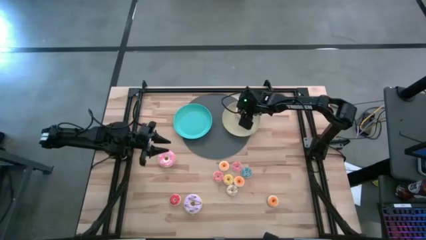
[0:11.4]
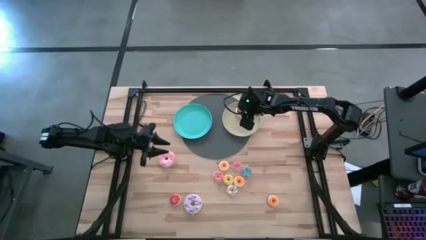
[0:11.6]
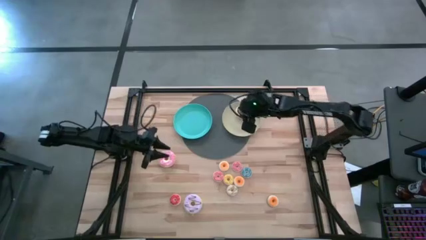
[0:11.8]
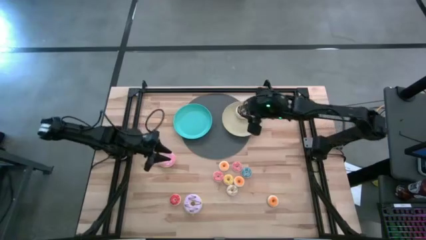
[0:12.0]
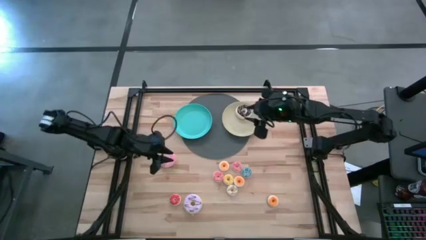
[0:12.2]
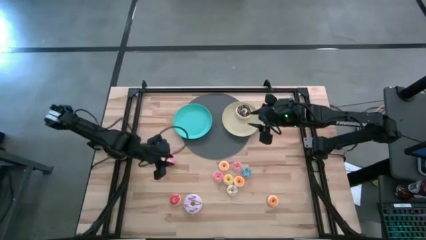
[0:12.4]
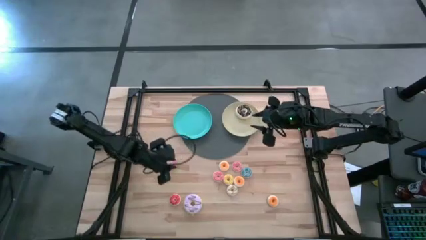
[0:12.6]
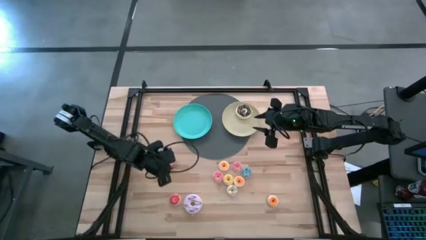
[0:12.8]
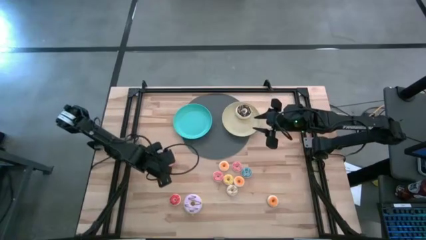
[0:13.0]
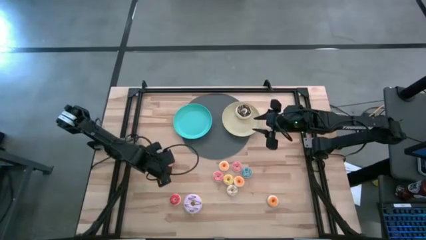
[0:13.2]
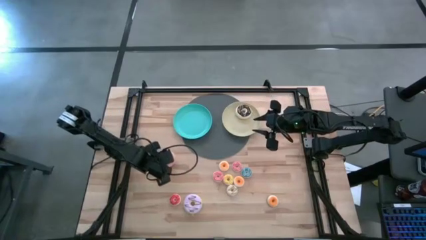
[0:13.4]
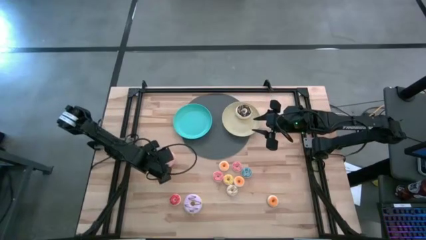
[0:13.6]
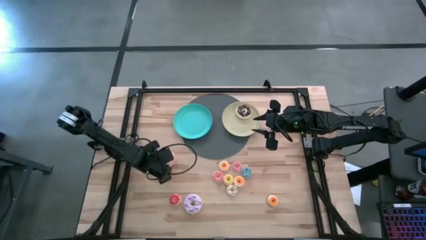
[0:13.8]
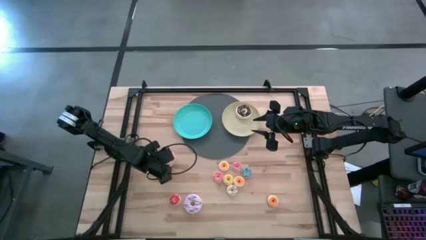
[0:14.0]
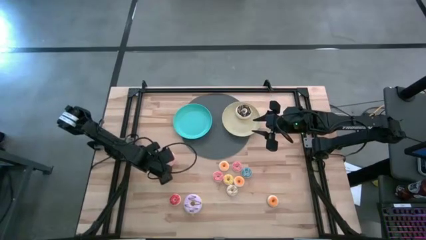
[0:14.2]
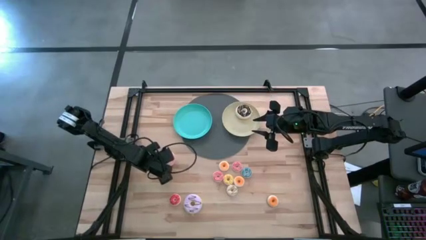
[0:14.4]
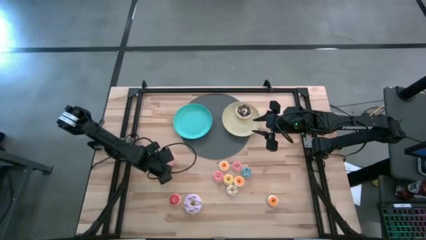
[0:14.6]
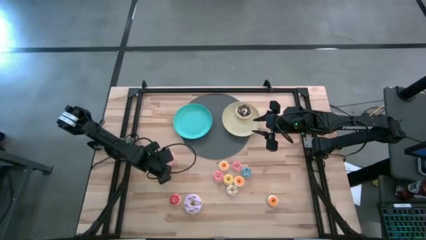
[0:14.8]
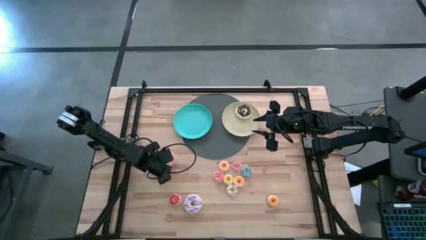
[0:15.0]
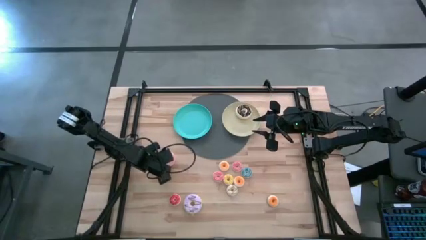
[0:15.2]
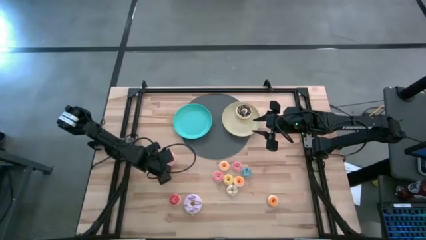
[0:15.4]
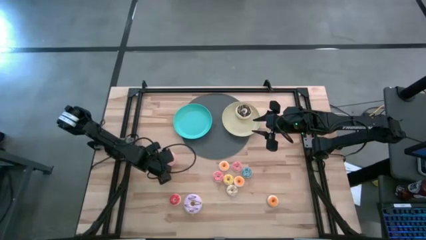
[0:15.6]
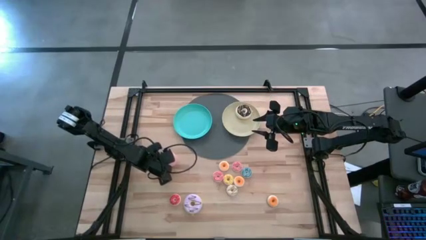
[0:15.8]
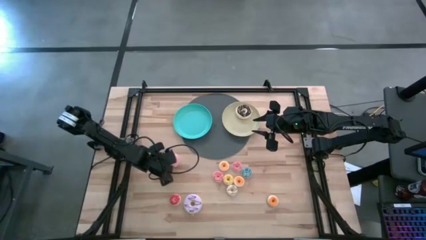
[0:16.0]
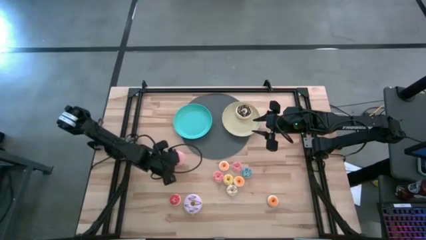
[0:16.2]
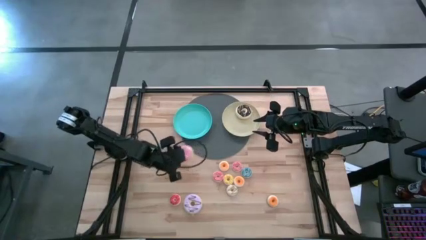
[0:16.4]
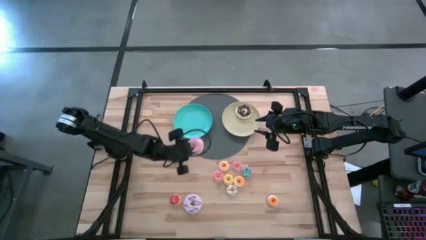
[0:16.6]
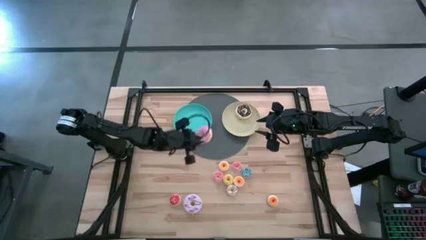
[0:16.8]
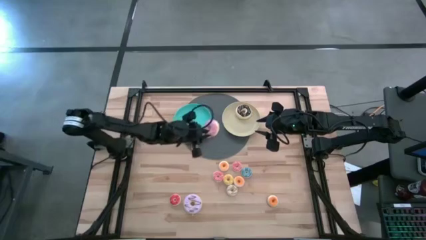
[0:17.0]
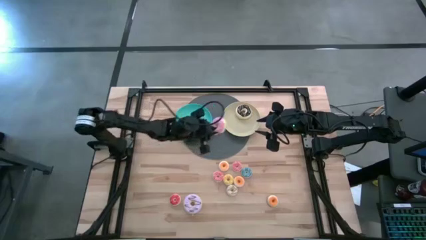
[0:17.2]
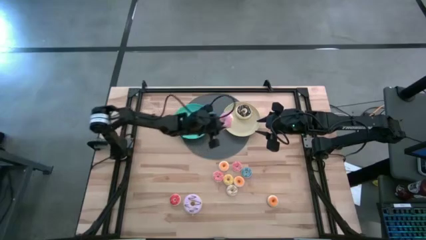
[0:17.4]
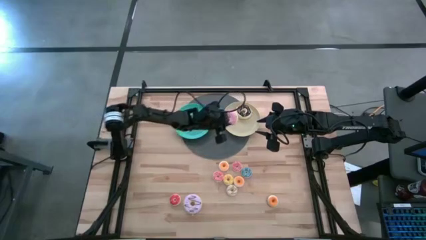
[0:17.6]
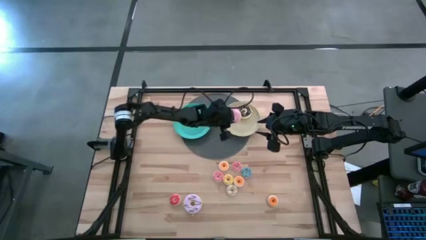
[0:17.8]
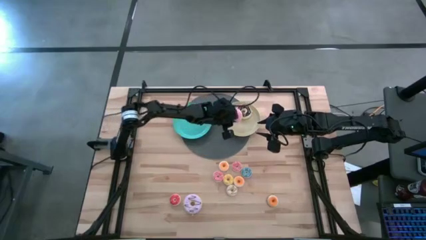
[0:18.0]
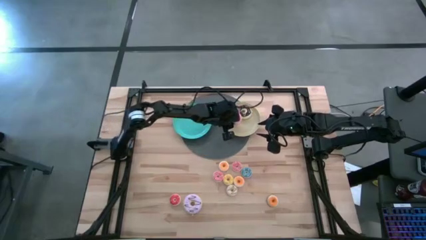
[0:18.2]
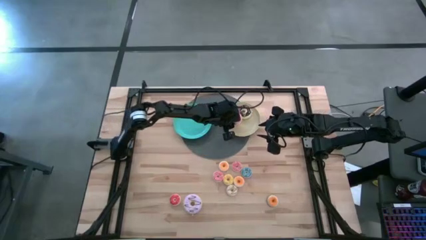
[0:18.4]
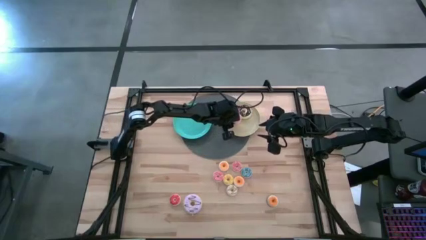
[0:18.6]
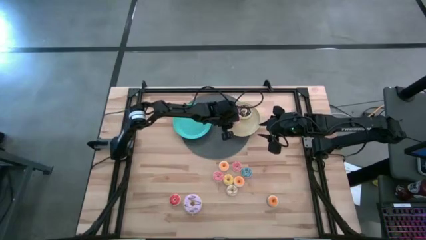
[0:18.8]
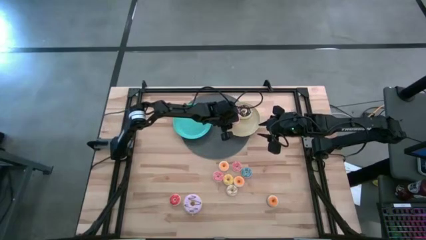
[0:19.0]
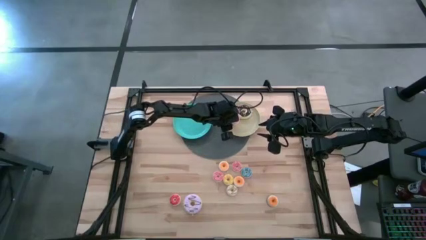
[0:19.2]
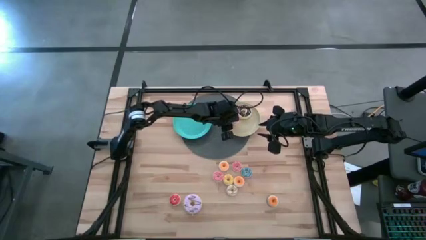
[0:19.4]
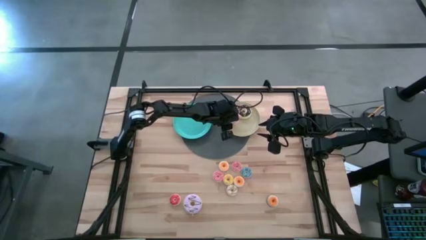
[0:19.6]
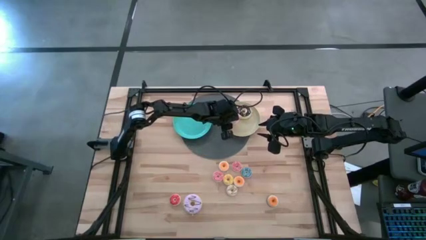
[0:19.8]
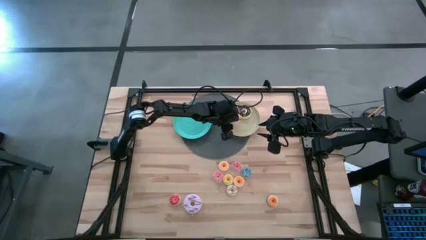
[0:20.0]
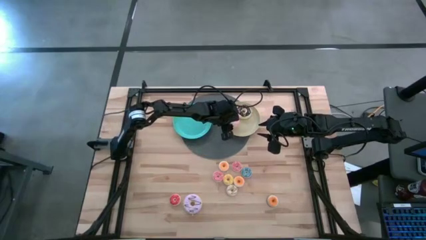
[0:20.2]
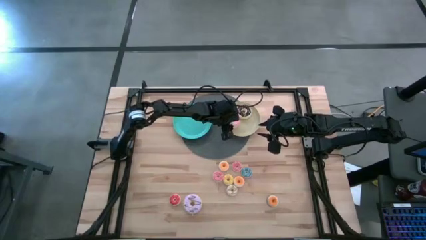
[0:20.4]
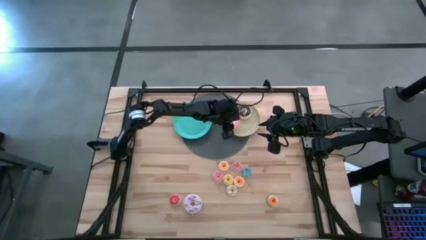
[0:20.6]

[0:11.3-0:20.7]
Task: Pick & Place donuts
Put the large pink donut on the brown plate

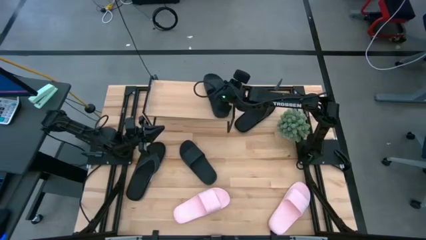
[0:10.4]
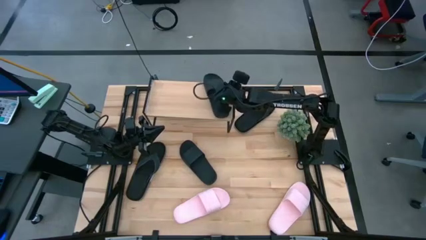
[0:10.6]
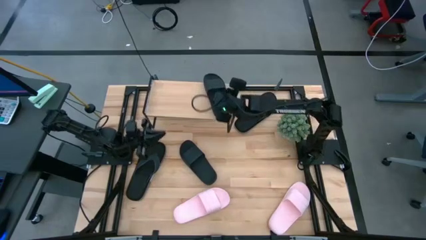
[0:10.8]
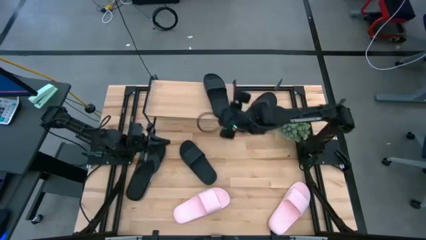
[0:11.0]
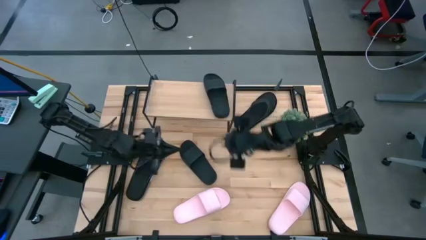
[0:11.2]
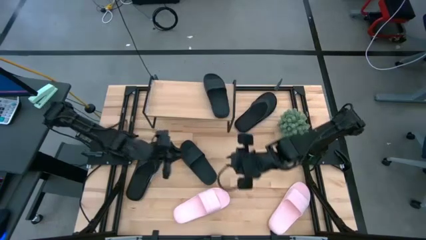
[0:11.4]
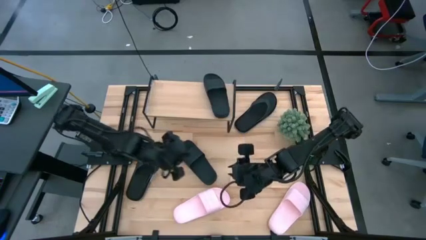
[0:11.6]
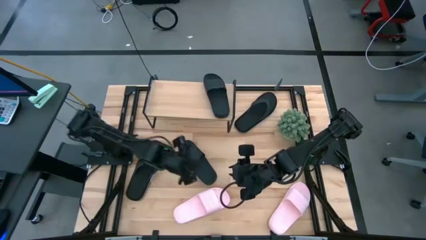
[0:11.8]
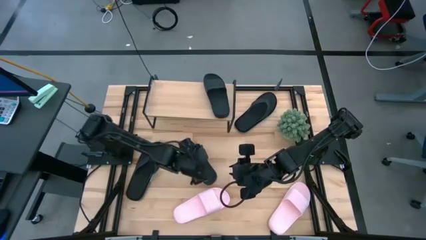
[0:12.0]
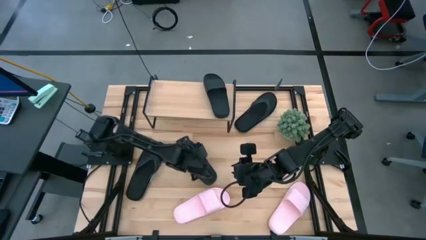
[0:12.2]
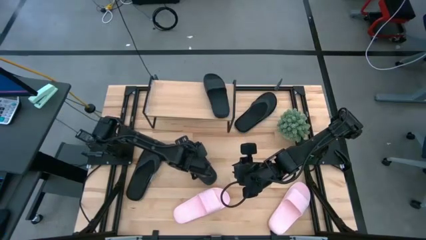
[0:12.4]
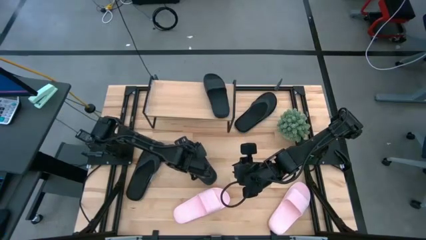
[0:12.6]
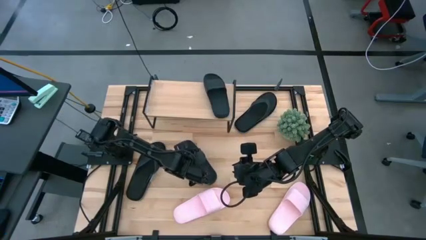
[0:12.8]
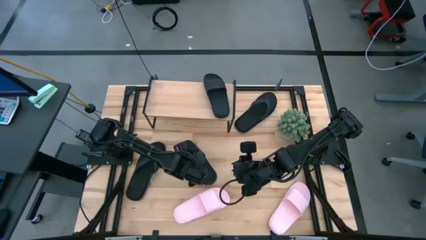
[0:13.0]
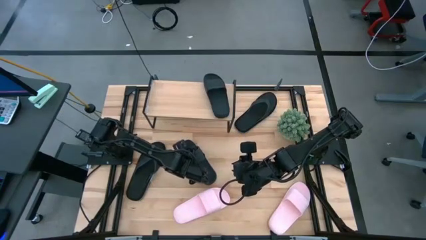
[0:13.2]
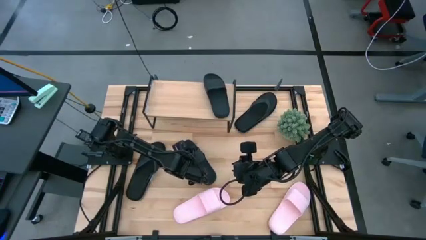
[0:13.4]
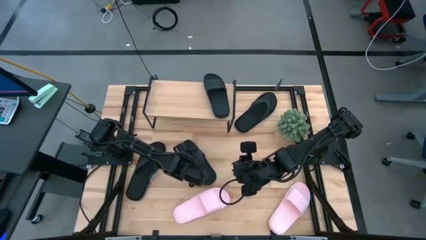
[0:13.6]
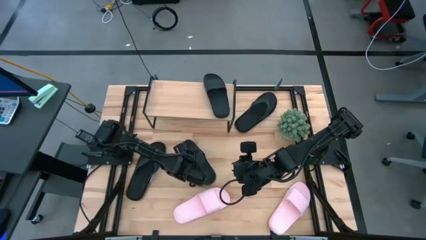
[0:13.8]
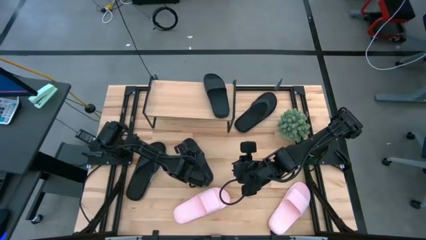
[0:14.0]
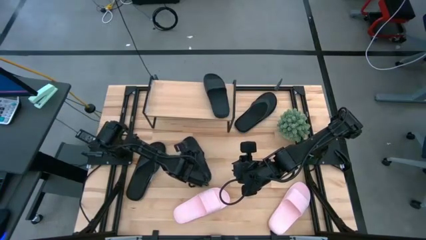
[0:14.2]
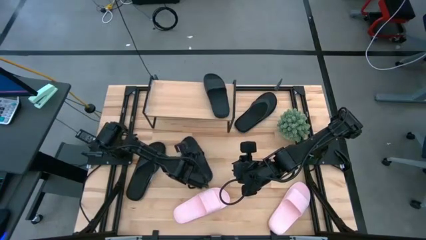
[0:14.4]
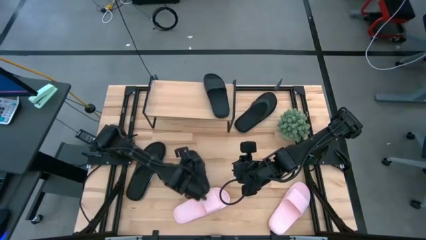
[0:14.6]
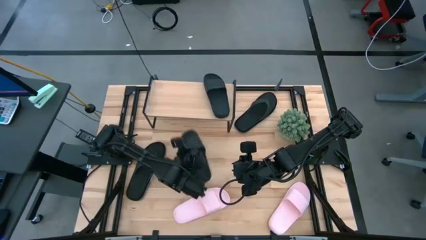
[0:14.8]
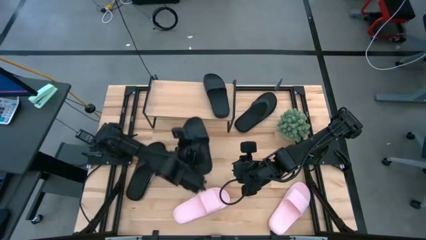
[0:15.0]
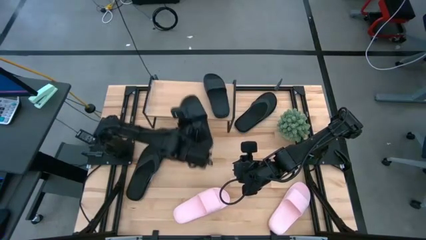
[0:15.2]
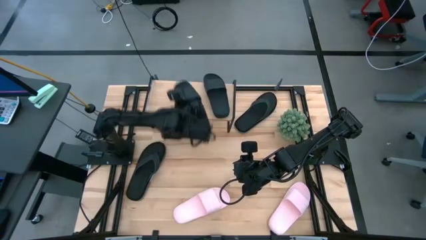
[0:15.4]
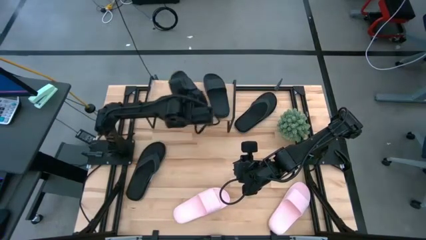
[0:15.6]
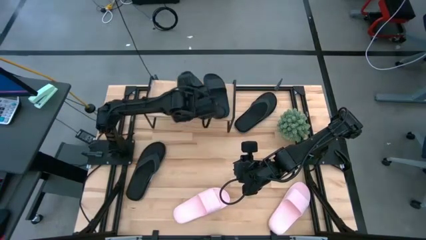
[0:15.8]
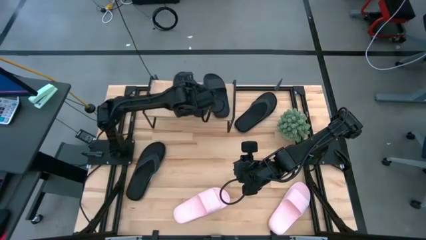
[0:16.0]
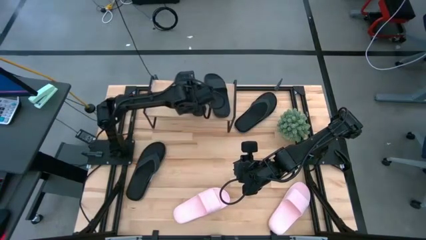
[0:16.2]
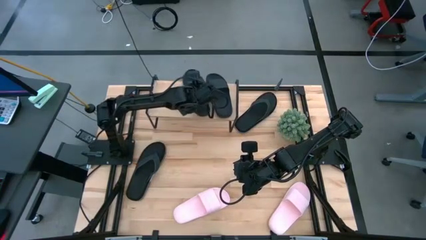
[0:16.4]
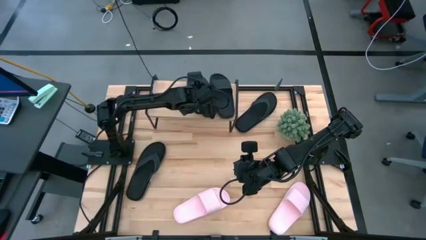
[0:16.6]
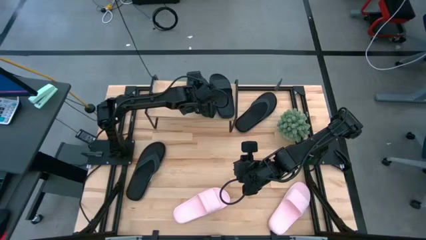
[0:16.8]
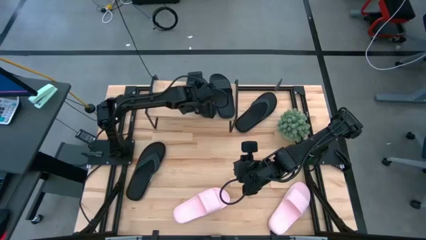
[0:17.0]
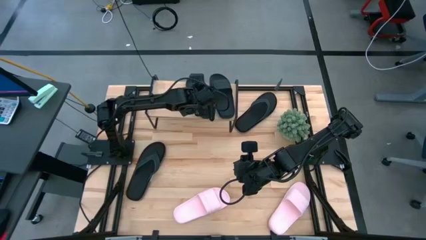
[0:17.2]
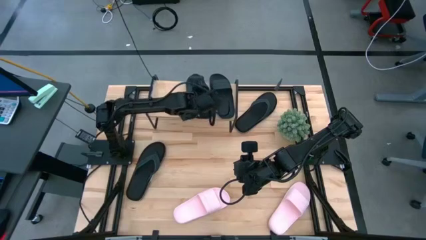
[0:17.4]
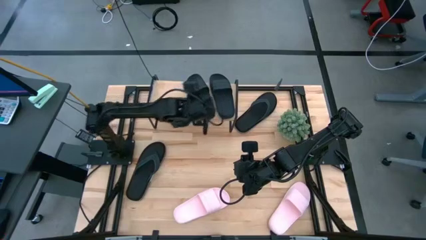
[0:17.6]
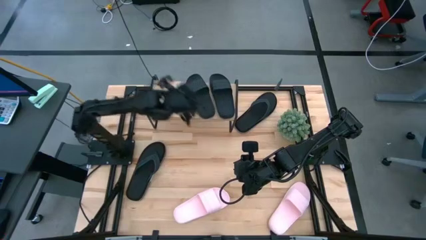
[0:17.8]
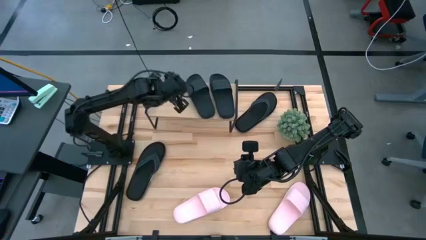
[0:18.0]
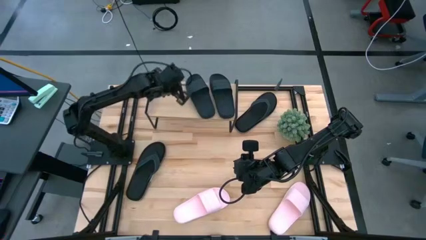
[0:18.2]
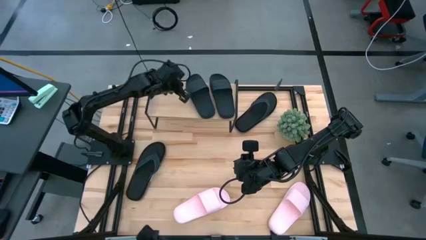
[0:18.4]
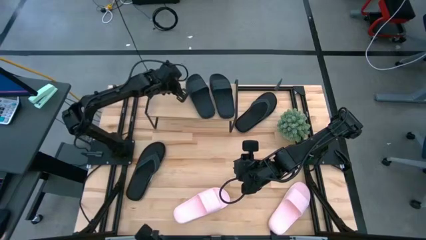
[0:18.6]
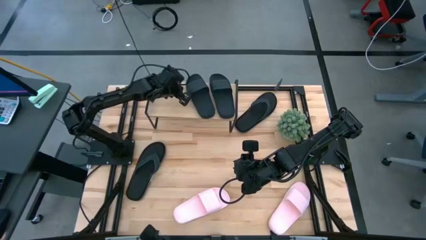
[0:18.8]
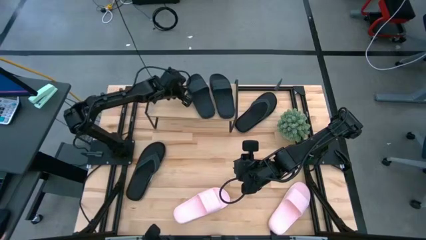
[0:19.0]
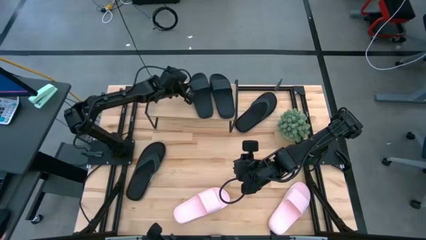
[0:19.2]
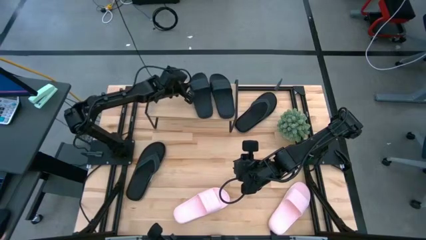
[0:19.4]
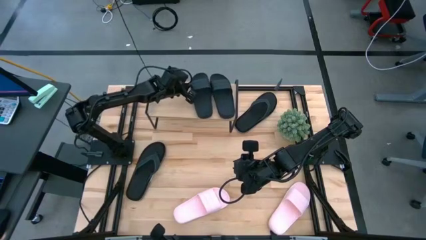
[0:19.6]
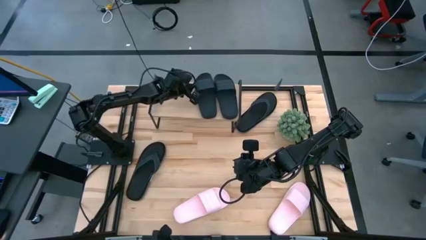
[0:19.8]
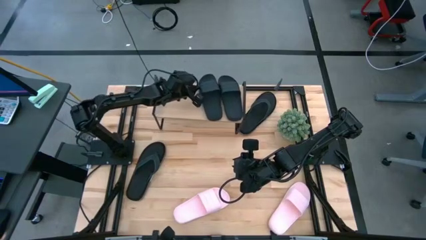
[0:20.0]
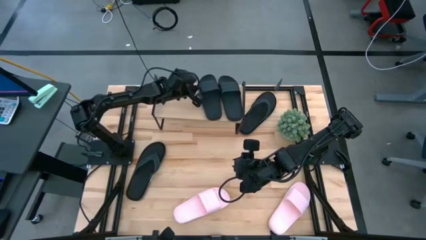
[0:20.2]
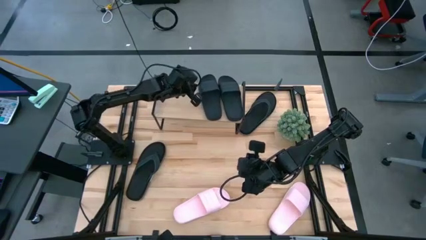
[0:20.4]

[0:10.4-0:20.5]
Task: Pick and place slides into the shelf
Put the left black slide on the shelf
